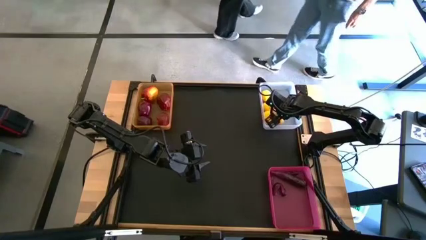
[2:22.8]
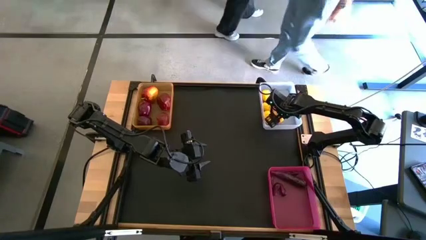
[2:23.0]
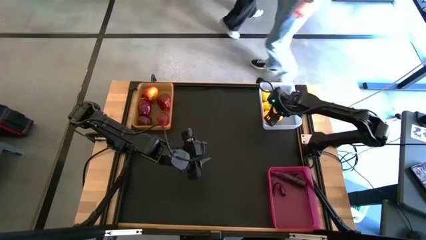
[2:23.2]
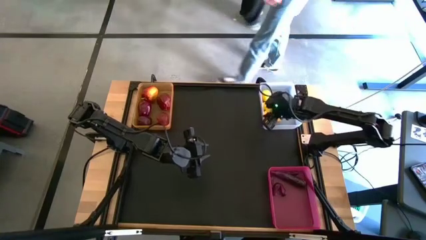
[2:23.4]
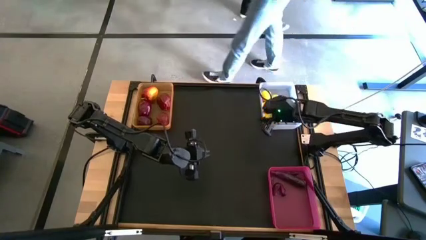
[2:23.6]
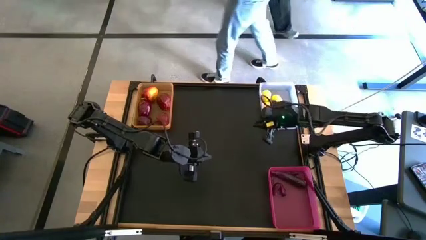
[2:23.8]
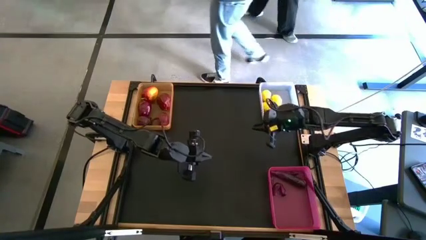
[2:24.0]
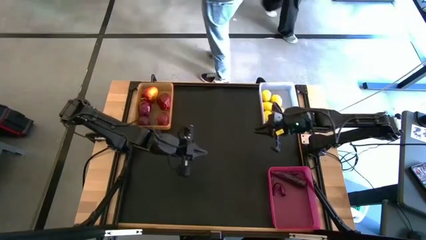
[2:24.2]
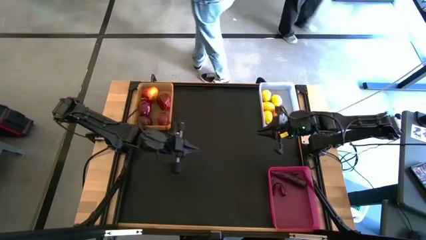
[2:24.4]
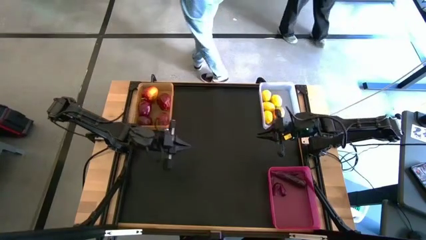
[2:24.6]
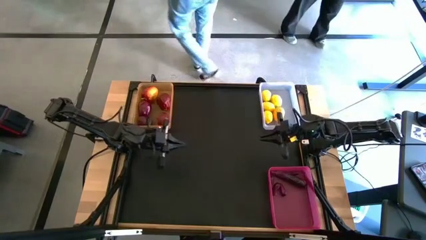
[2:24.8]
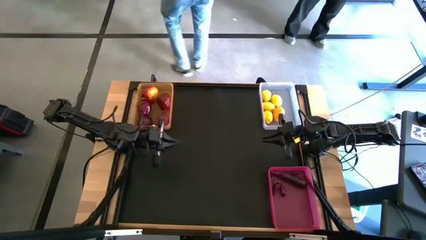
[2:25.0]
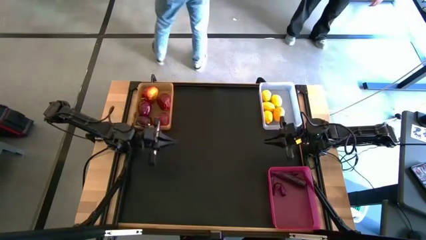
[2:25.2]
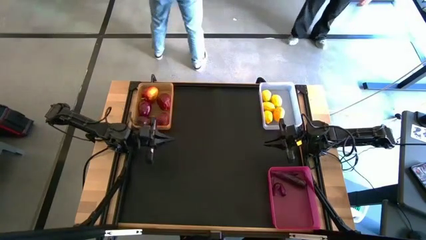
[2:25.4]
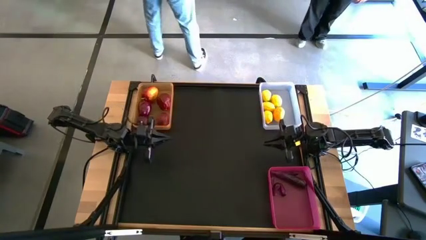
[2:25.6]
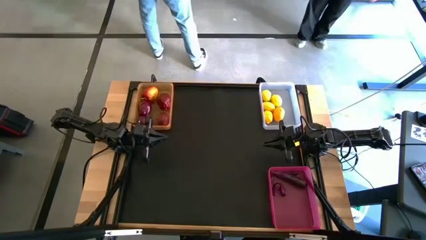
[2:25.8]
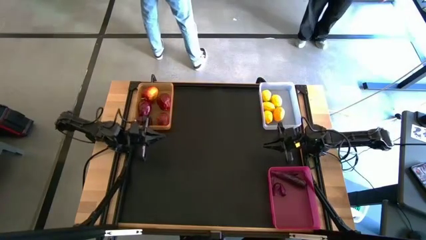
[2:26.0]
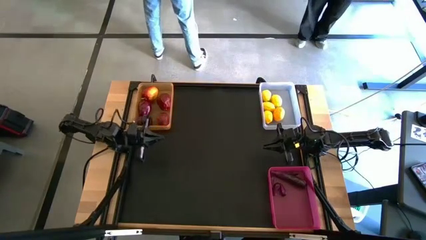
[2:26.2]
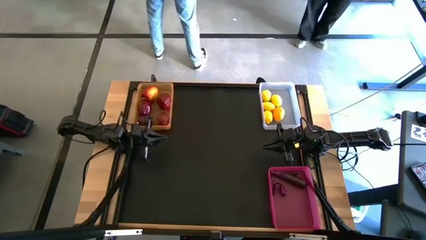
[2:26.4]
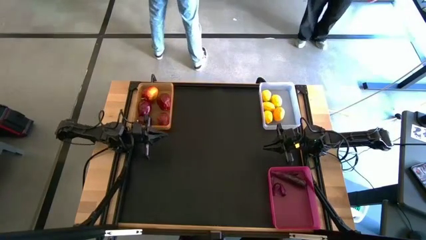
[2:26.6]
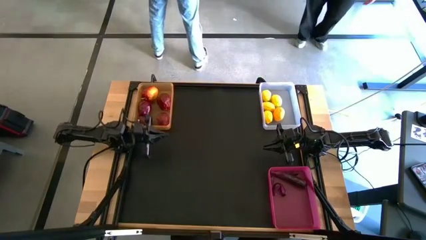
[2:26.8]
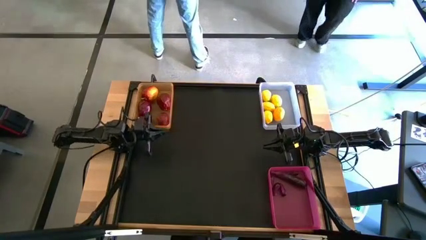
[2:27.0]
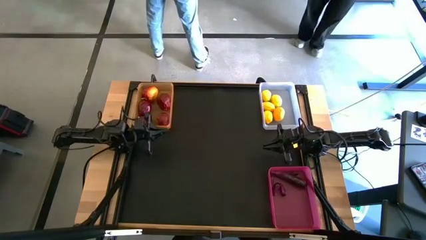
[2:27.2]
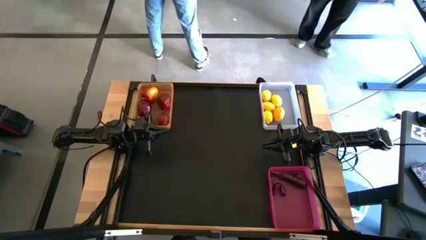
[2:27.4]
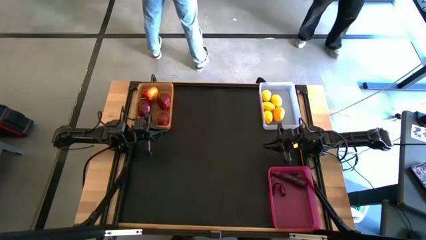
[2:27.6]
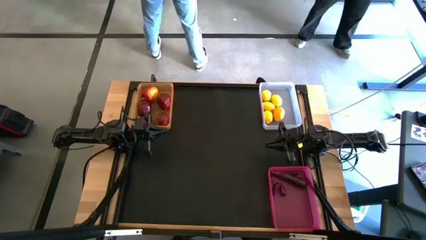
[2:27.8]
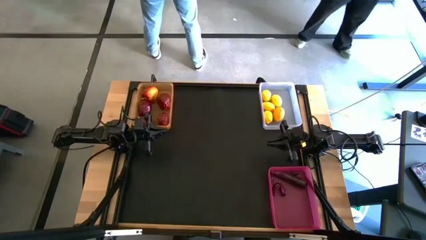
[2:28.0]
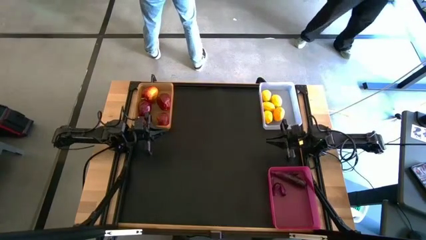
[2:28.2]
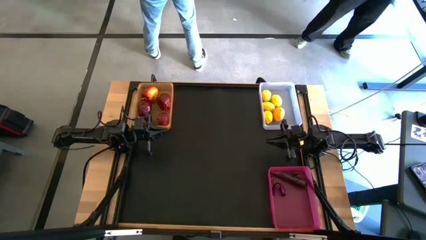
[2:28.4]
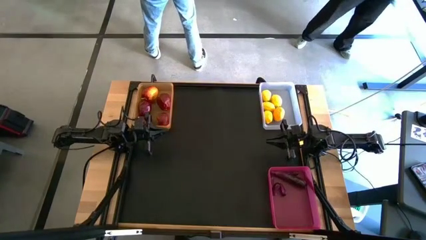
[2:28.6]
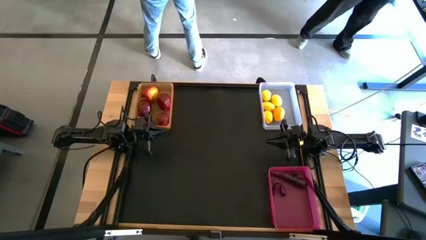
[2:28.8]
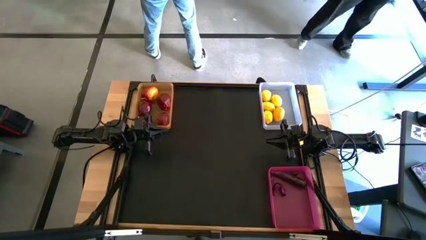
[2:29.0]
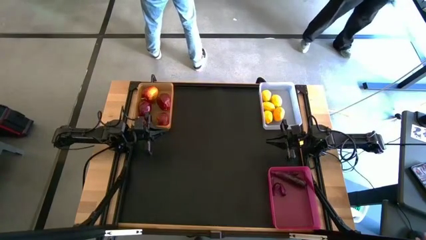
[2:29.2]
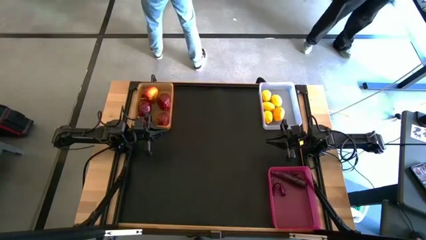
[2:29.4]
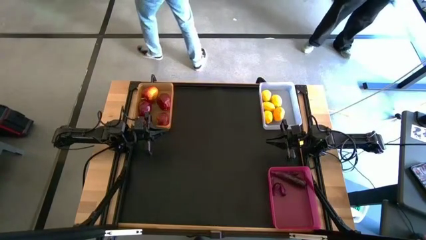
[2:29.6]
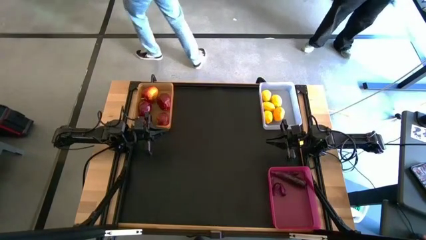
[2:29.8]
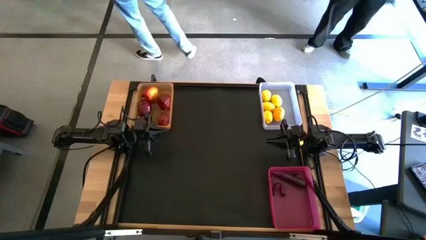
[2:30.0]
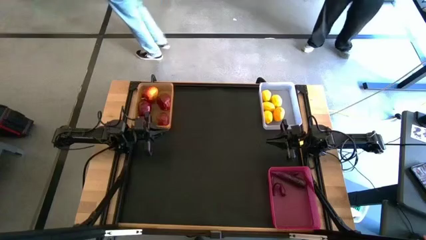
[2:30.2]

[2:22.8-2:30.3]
Task: Sort produce into baskets
Return to Home Position

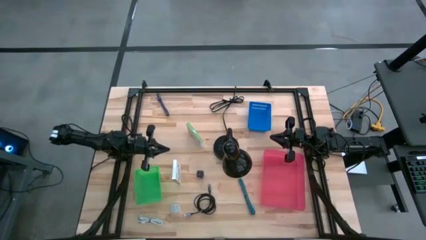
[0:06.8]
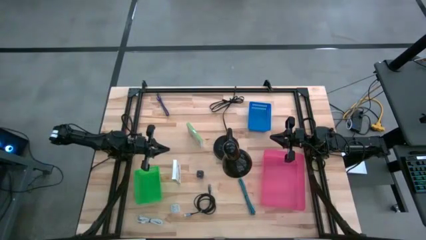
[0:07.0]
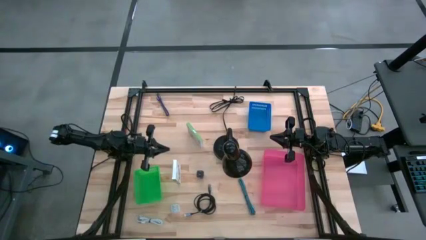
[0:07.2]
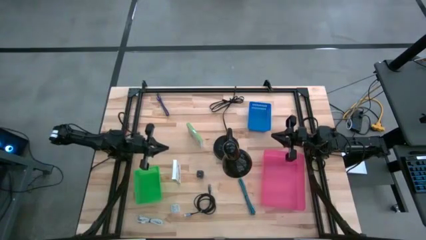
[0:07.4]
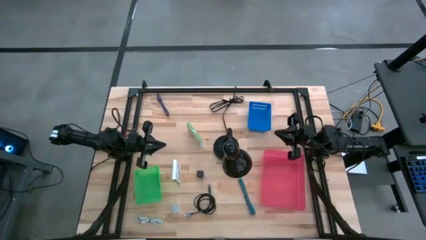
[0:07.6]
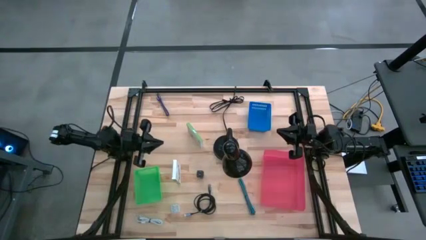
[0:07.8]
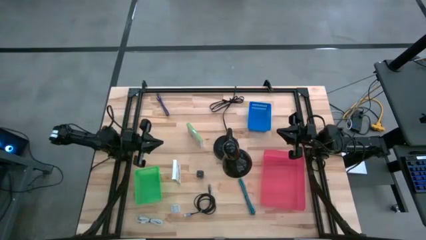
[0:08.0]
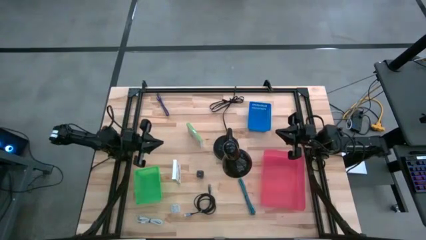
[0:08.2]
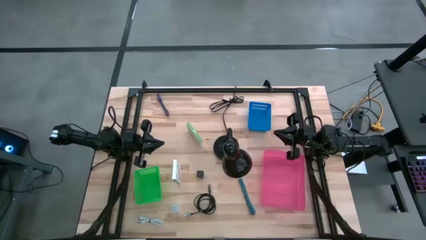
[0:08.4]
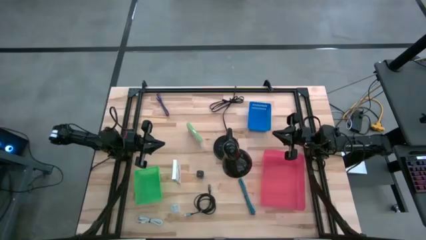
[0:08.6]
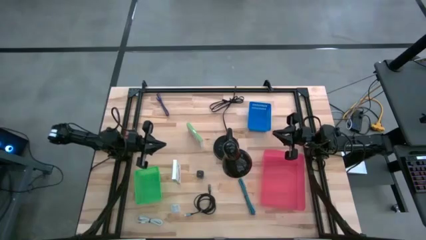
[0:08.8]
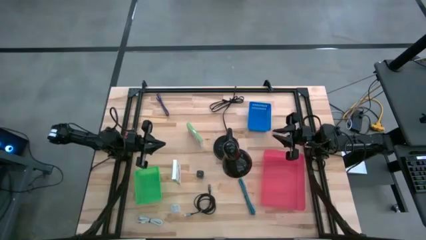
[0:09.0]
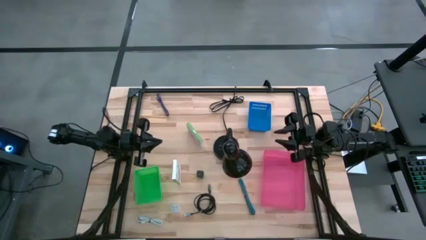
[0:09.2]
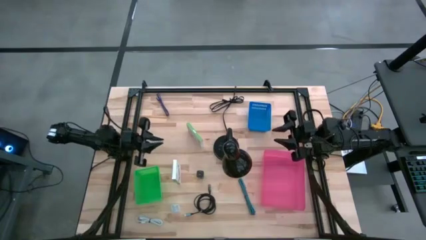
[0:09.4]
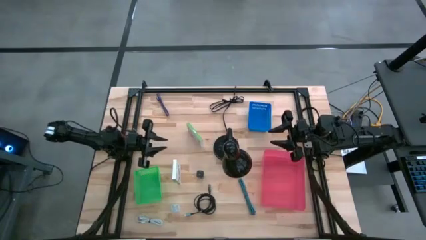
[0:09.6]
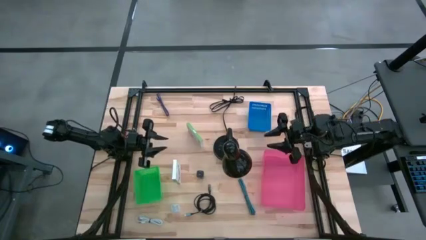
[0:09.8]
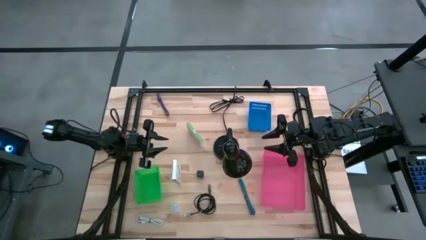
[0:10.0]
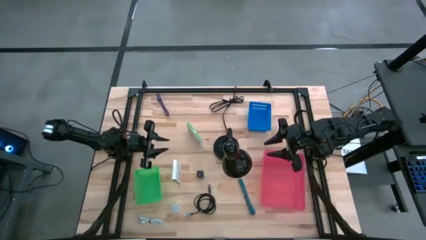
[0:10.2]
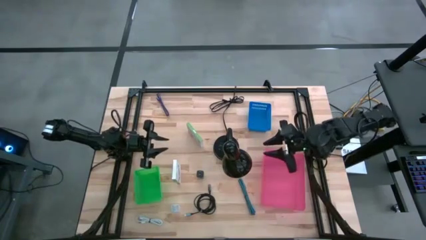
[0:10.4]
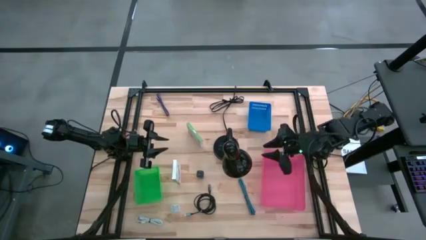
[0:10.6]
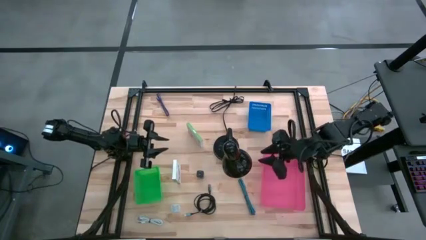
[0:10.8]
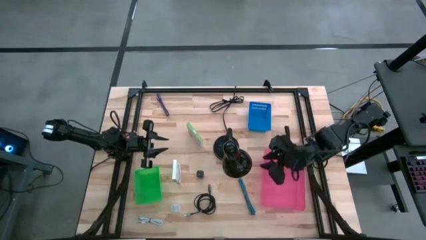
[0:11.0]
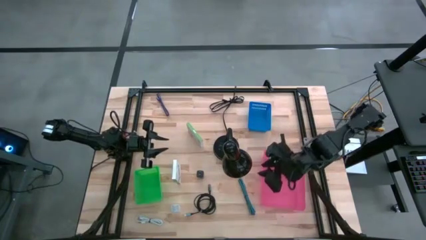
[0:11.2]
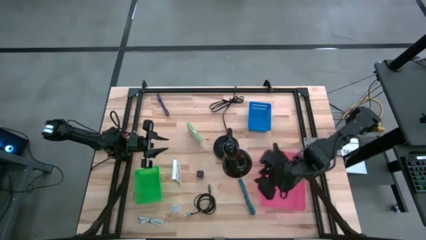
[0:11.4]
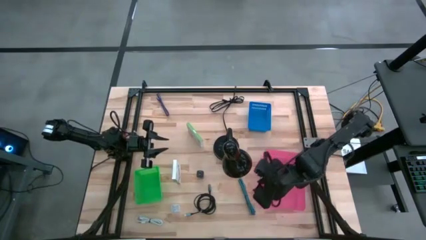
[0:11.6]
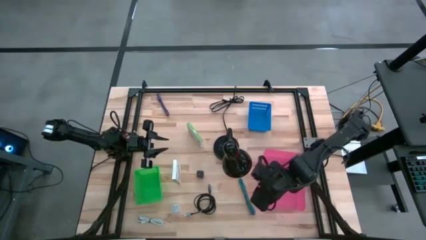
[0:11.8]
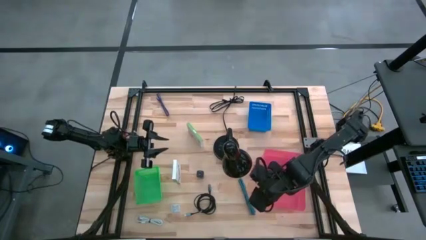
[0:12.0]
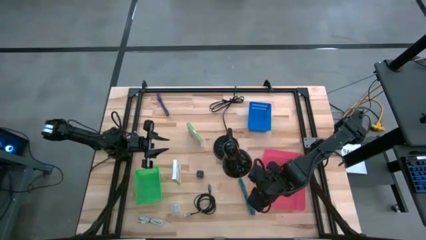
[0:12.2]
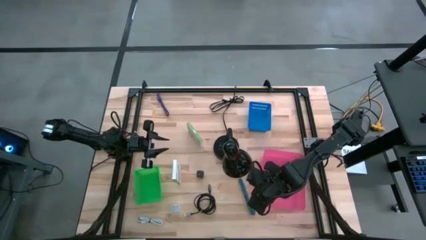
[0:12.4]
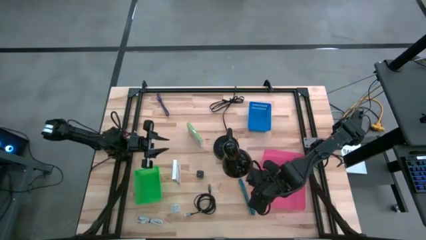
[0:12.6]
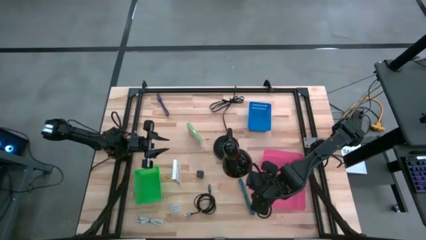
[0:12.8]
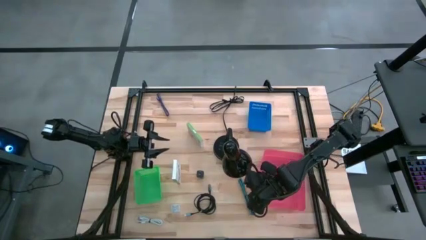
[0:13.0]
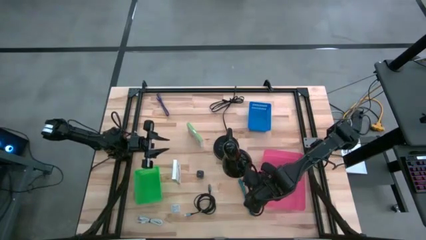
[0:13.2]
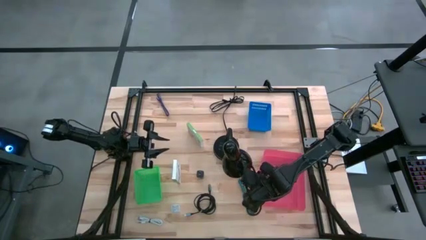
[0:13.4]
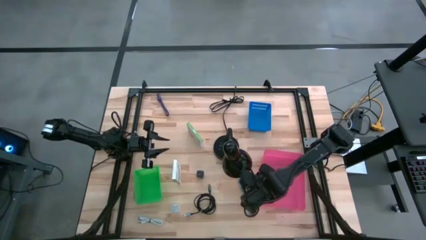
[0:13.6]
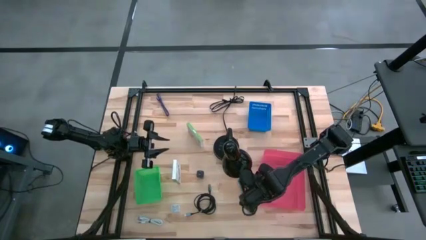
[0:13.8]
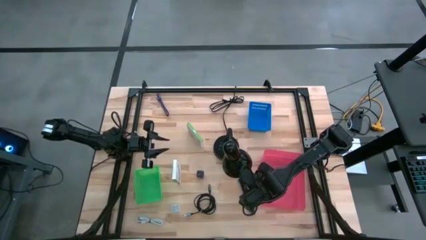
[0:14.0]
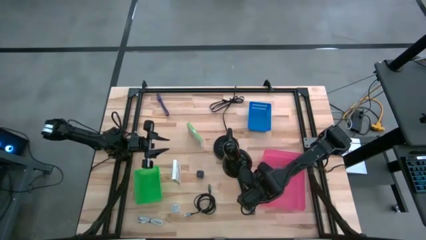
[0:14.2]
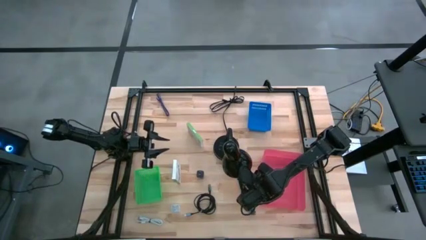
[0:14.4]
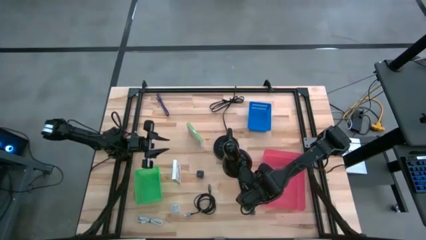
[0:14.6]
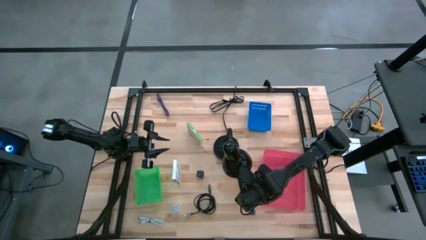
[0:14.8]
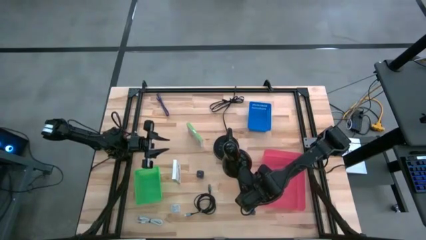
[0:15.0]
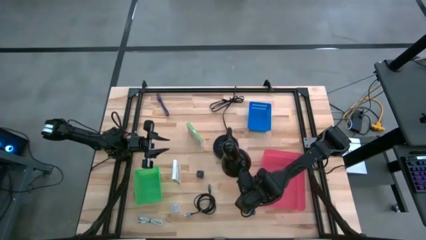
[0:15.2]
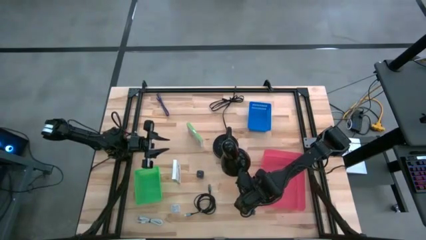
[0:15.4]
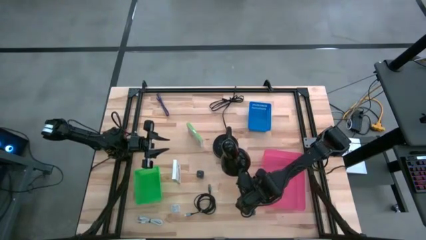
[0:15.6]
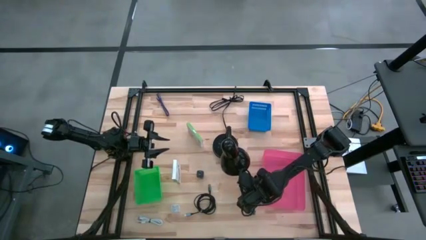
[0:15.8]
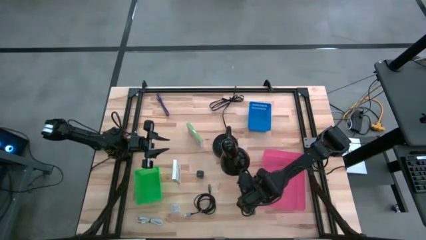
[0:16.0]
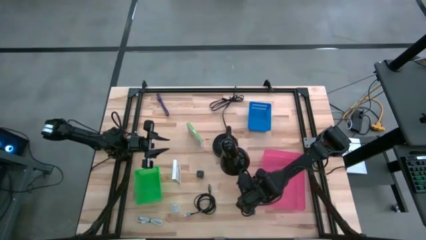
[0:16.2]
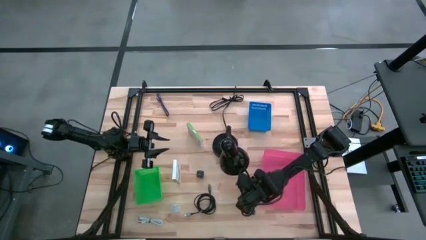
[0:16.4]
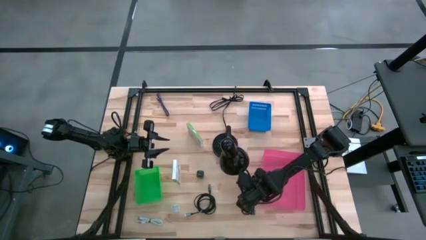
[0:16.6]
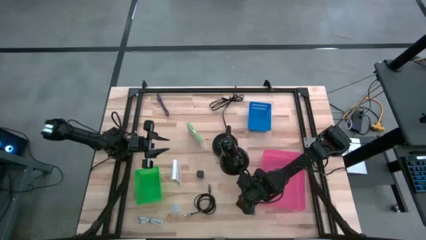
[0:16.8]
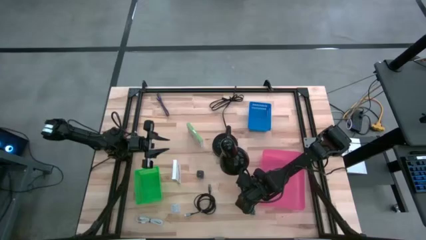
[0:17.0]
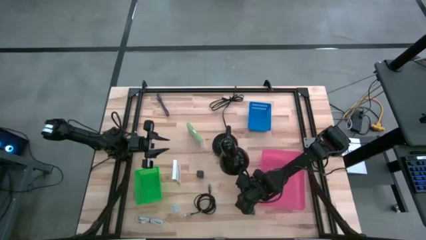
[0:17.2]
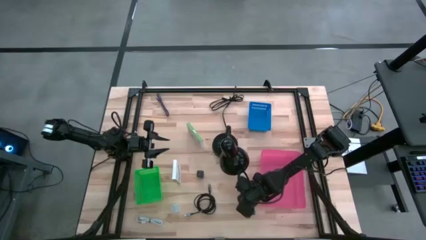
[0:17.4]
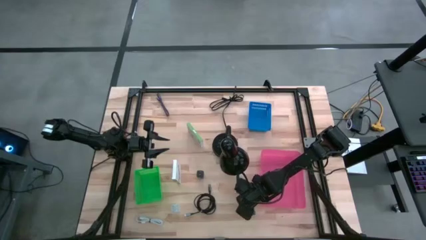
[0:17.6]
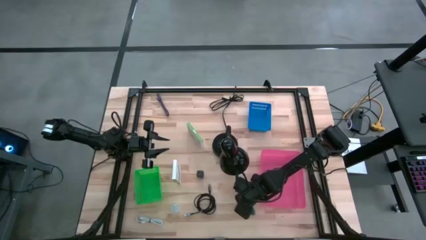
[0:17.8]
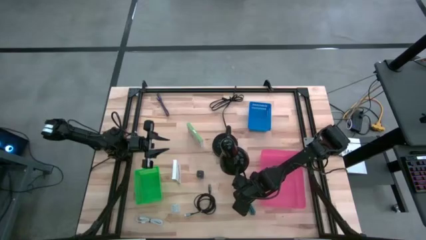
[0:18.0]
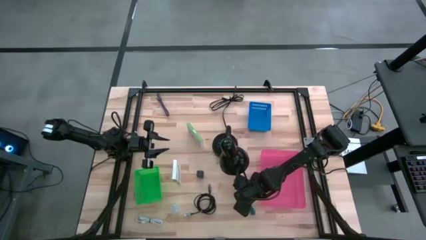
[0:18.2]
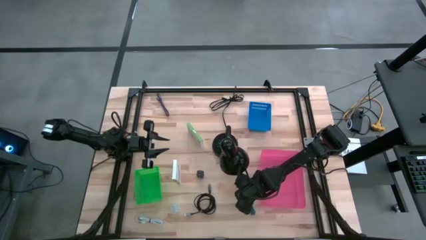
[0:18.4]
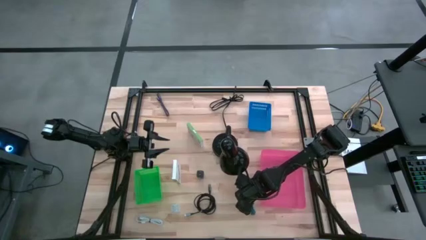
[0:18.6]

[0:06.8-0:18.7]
Task: Pick and place items into bin
Put the blue charger cable into the red bin
